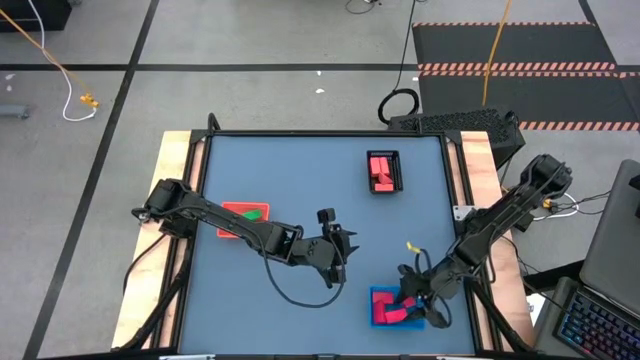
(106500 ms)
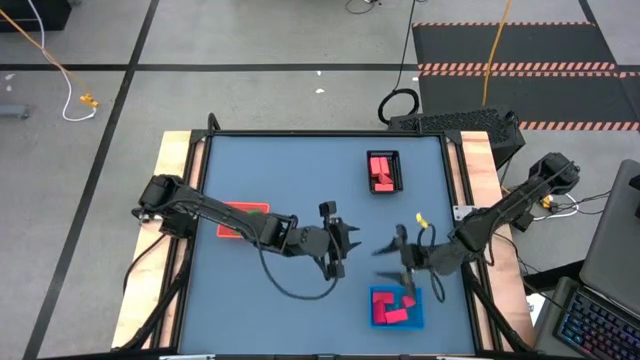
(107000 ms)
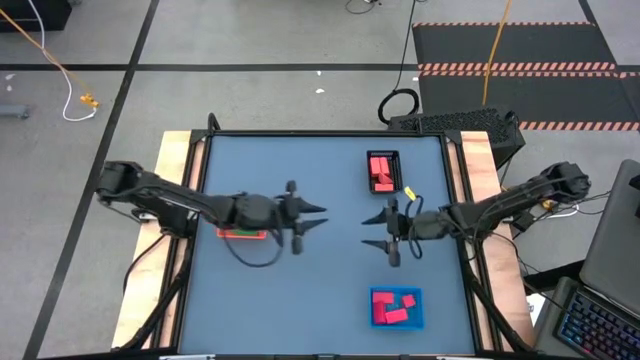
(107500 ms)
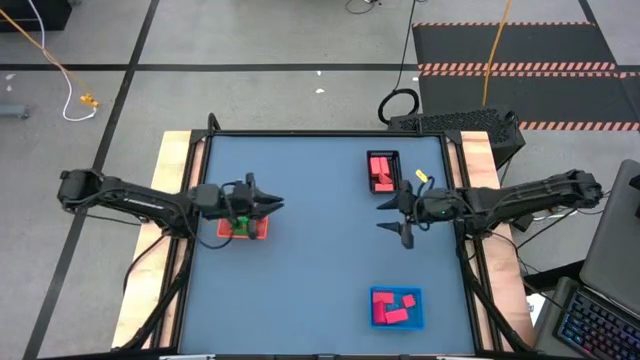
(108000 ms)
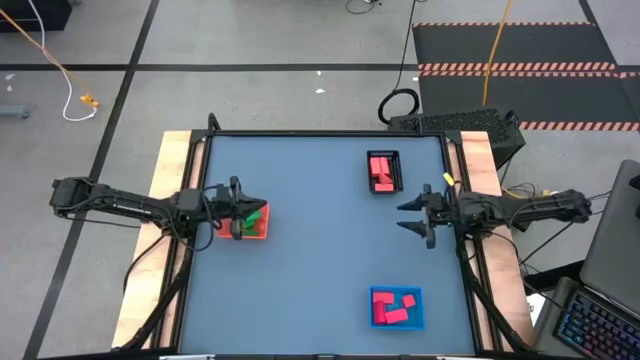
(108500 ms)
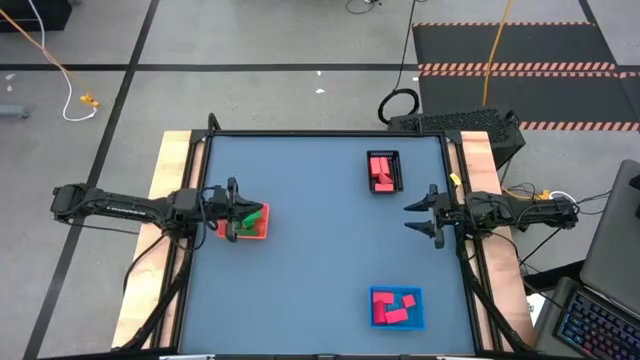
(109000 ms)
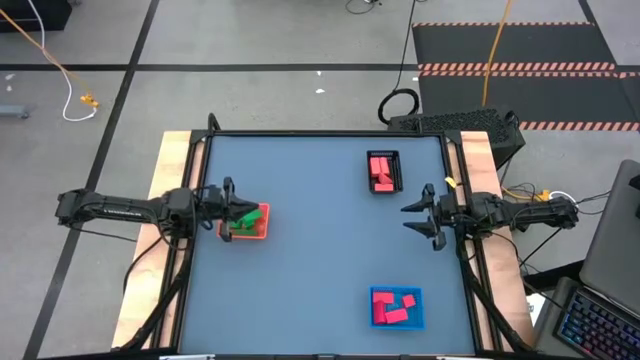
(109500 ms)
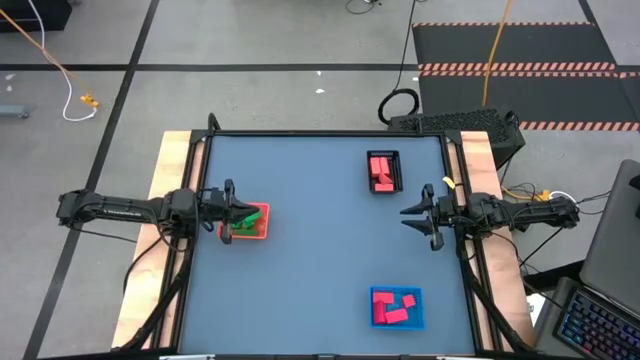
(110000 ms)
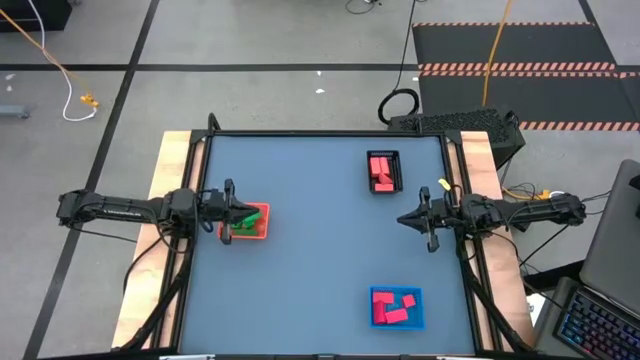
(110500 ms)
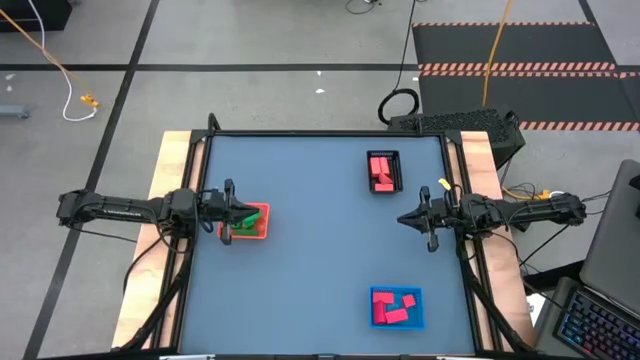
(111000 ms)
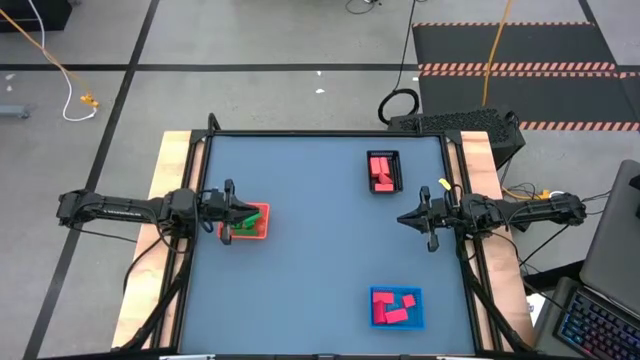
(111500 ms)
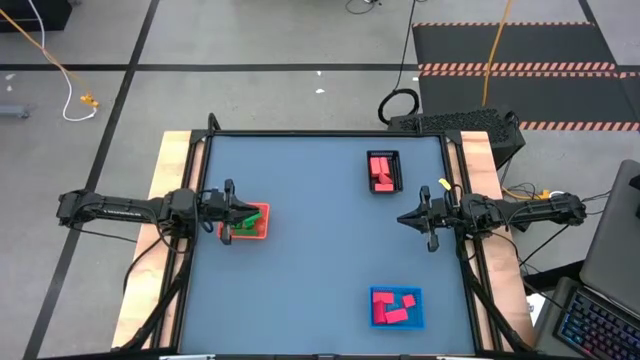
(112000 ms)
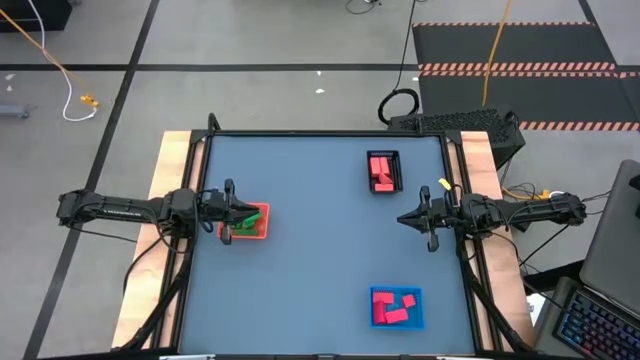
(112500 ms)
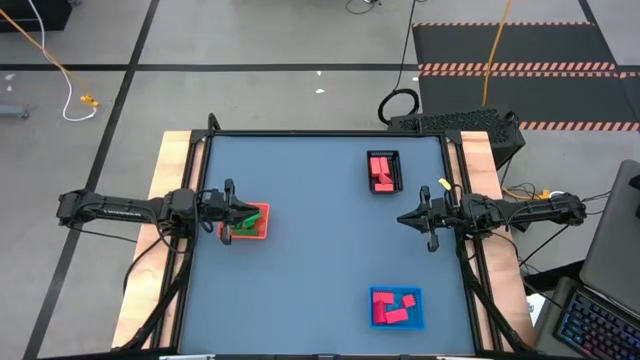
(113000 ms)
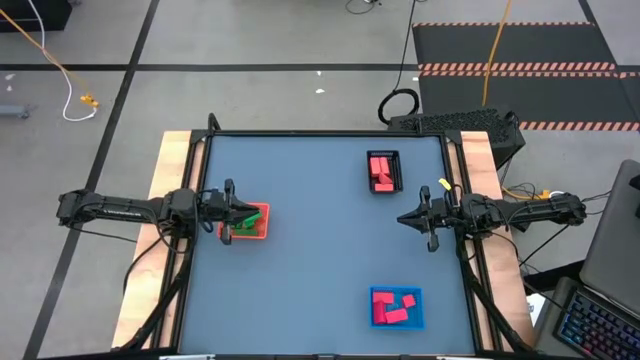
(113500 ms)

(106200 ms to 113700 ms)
Task: Sort & place blocks by color
Return to Home Position

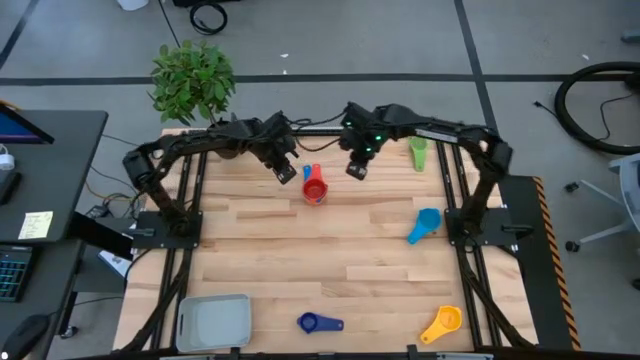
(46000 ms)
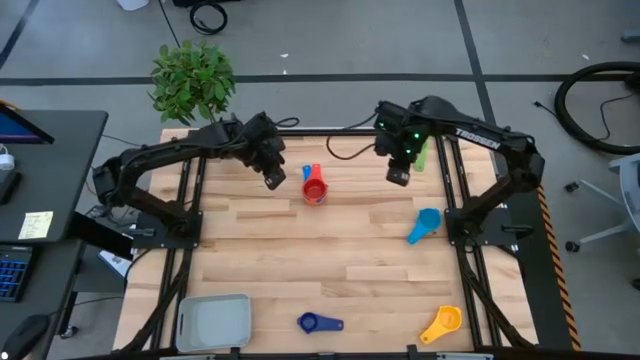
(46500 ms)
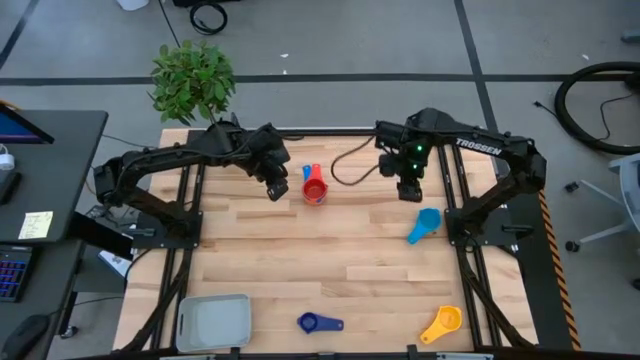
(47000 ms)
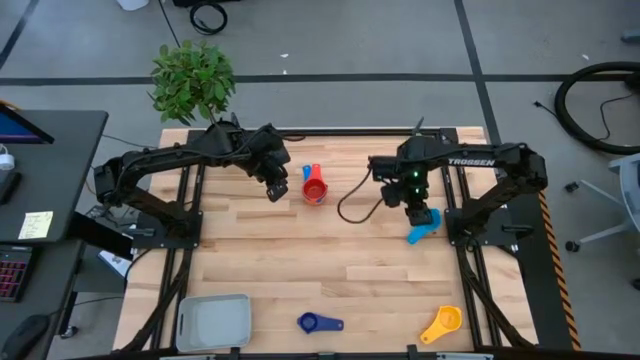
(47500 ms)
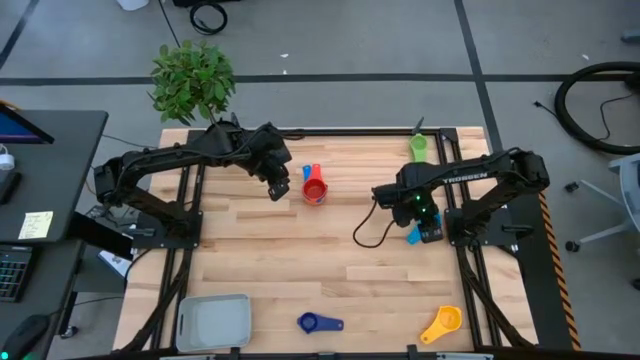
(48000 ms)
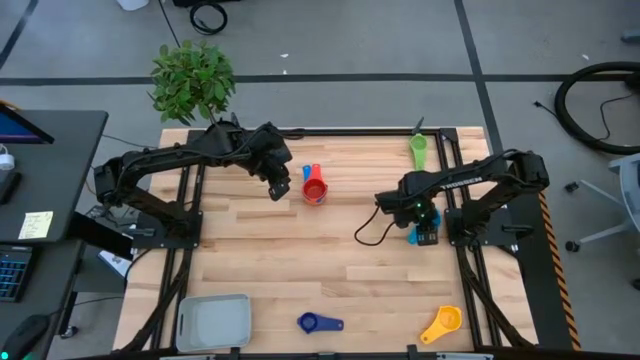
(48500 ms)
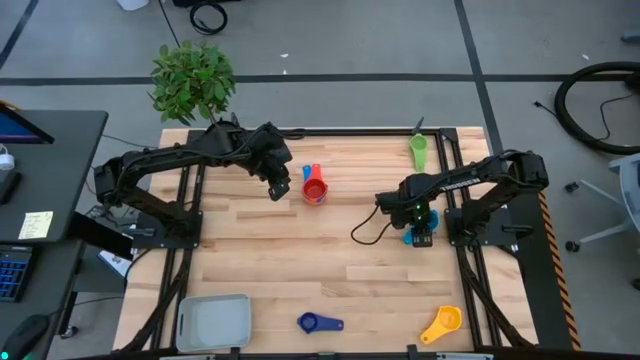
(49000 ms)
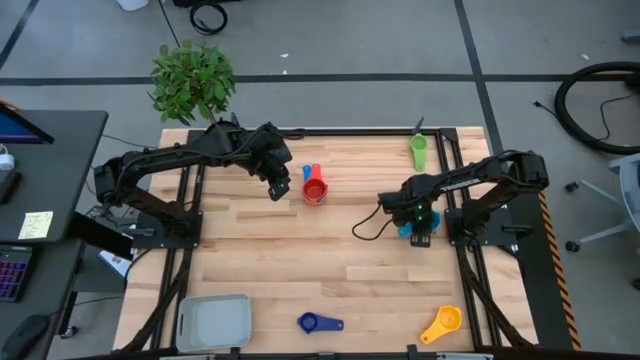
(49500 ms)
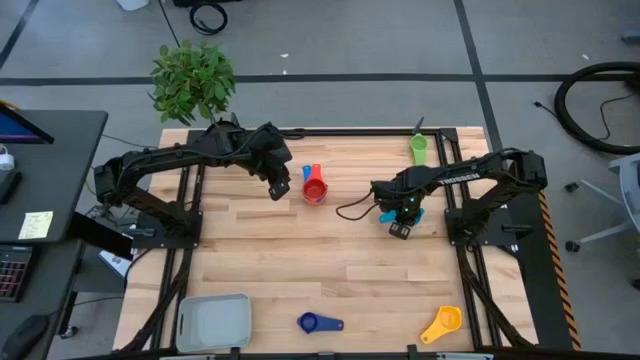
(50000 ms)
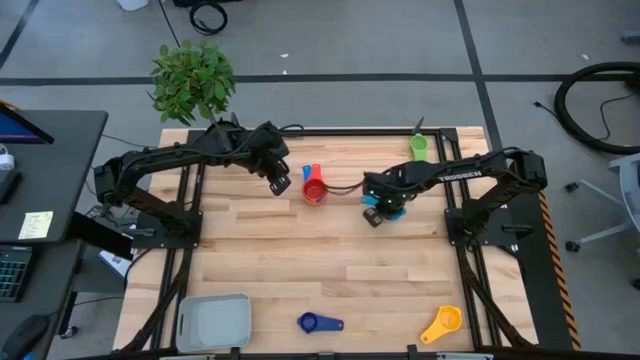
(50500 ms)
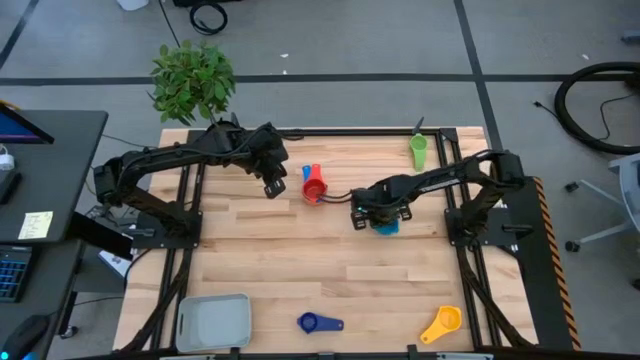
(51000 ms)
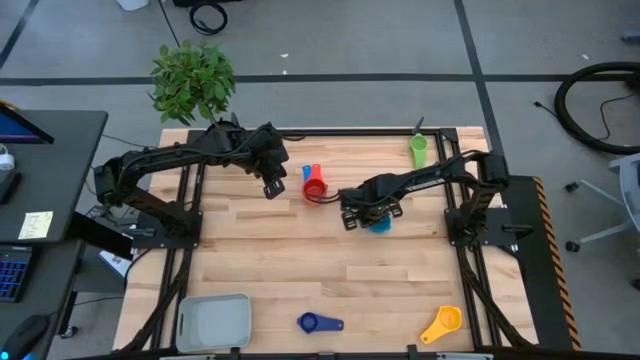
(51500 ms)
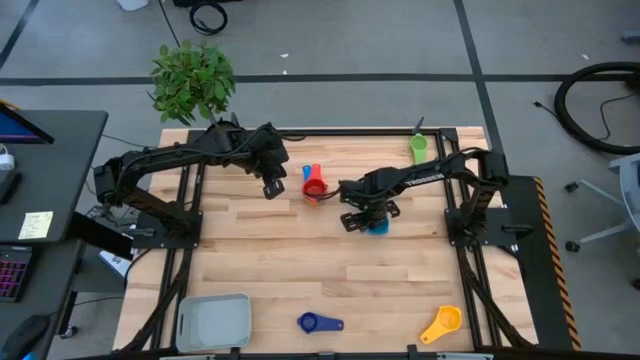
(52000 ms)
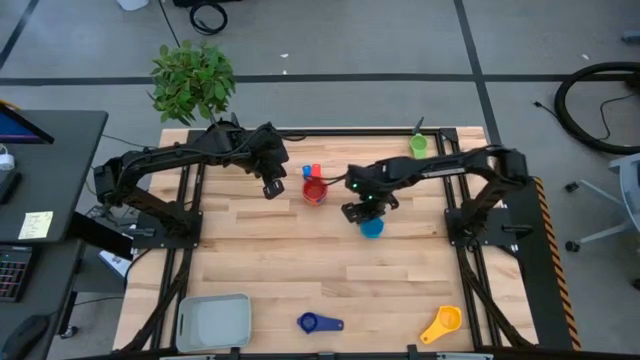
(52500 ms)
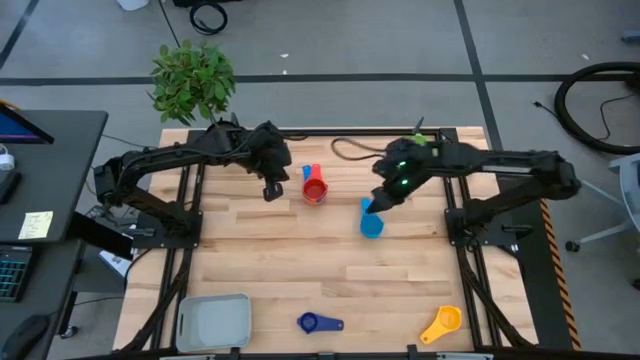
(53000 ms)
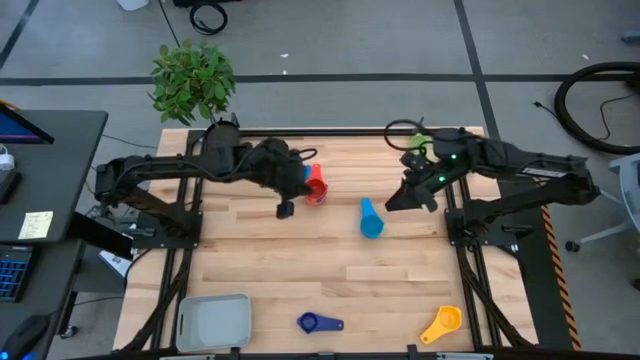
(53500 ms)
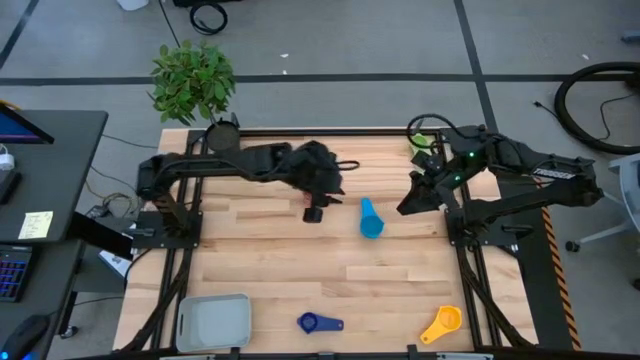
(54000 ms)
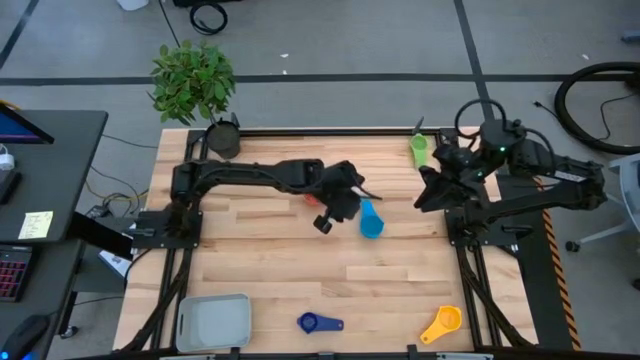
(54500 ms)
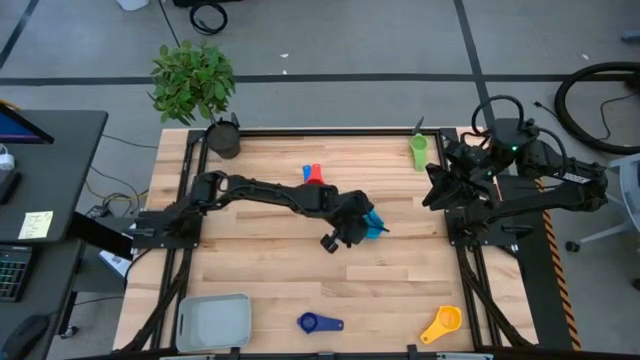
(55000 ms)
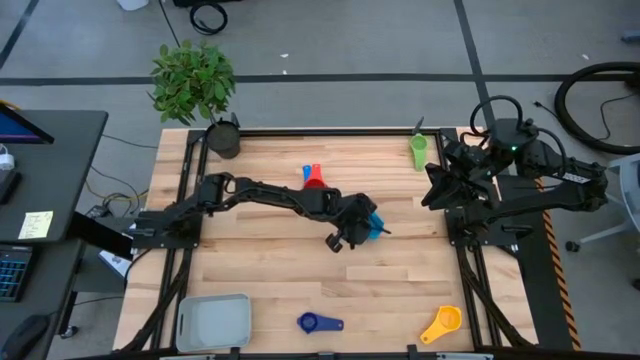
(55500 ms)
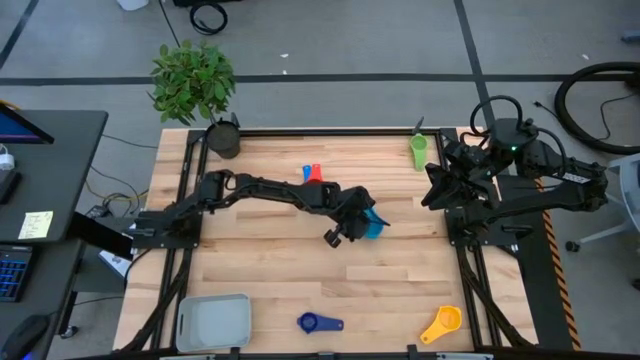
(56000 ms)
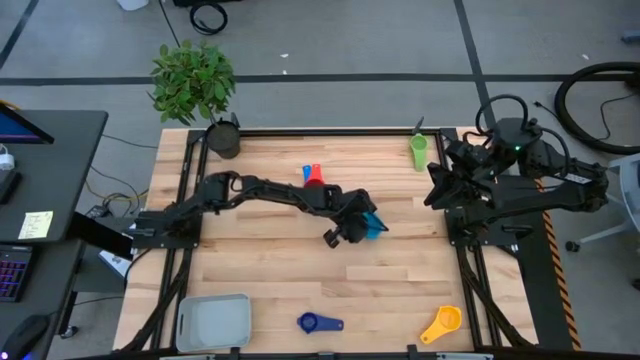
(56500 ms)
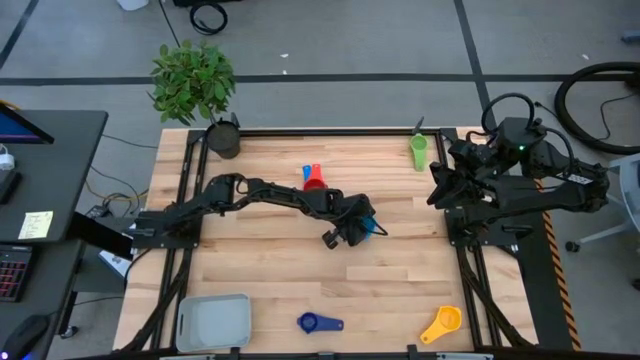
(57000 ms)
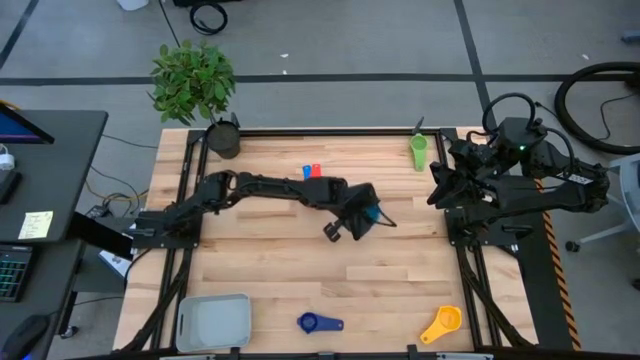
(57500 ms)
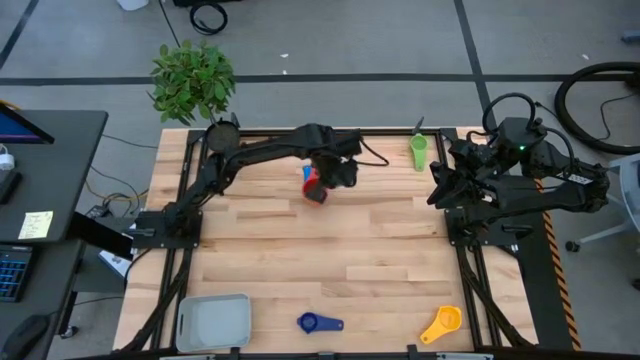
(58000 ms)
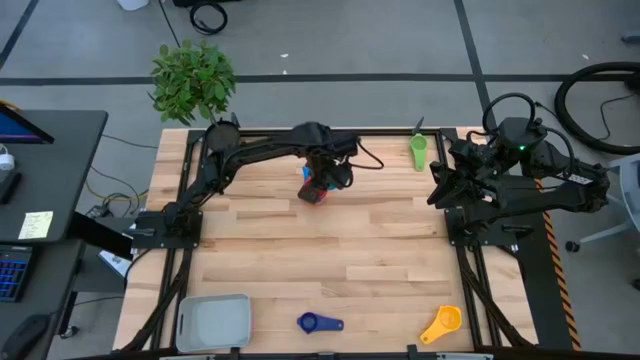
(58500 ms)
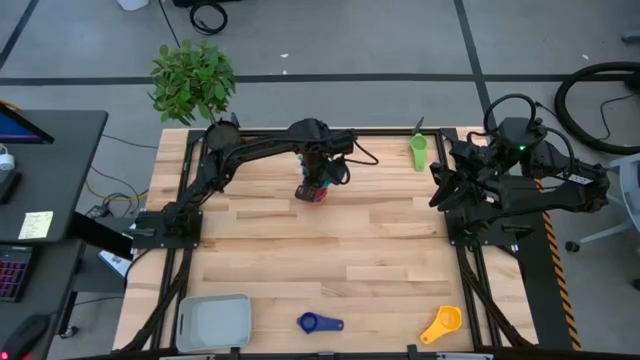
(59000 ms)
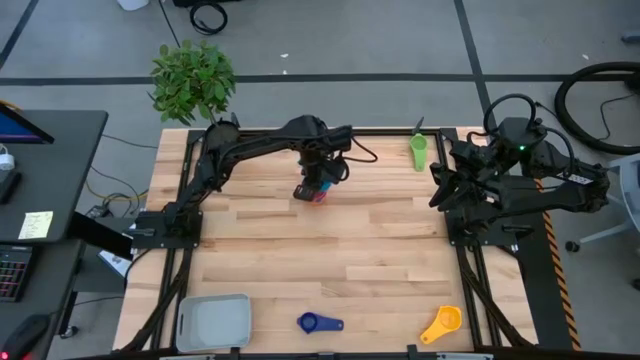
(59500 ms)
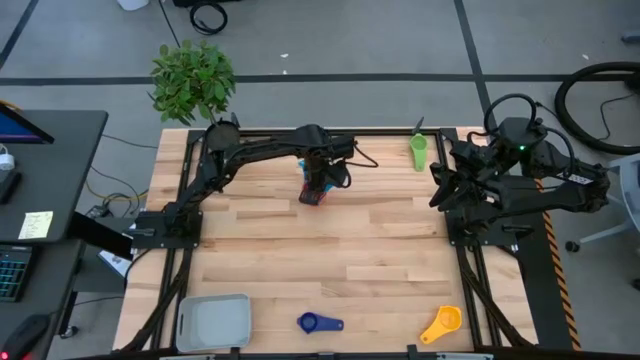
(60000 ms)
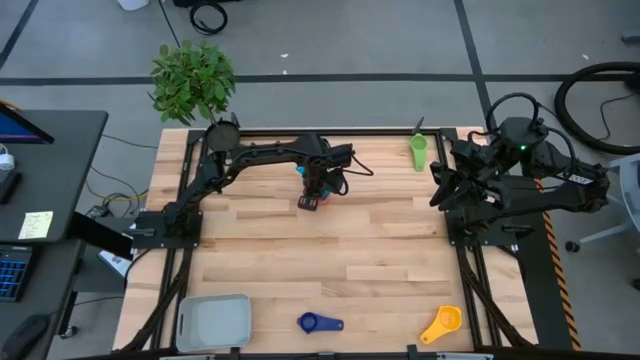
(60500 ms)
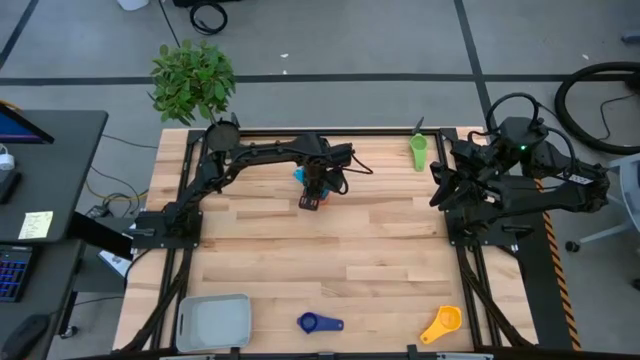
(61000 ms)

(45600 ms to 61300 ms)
Task: Nest measuring cups in basket
Stack the light blue measuring cup on top of the red measuring cup
